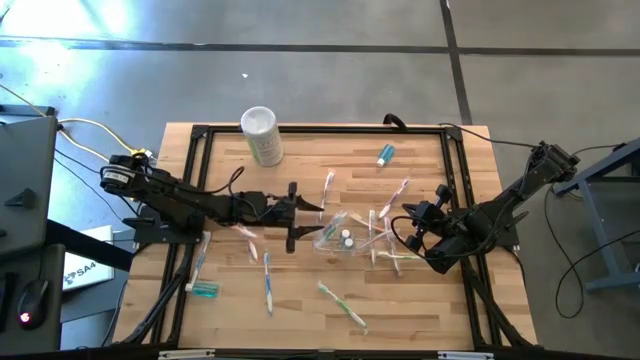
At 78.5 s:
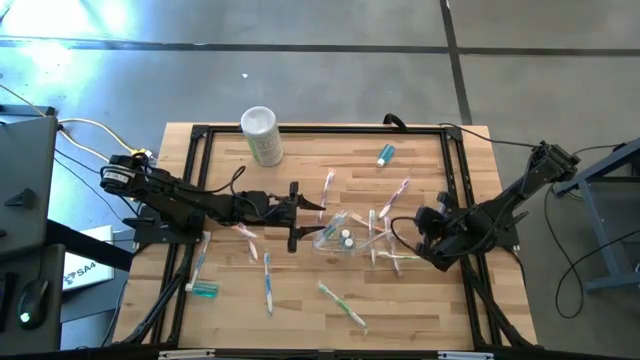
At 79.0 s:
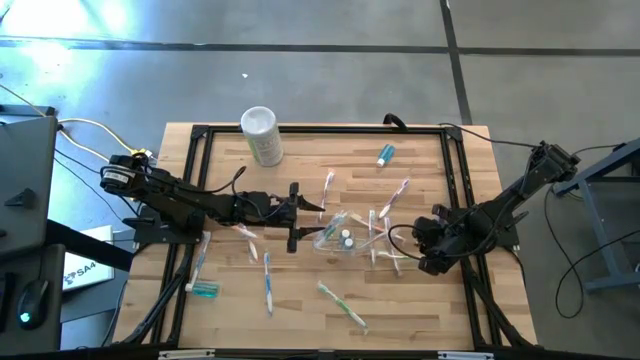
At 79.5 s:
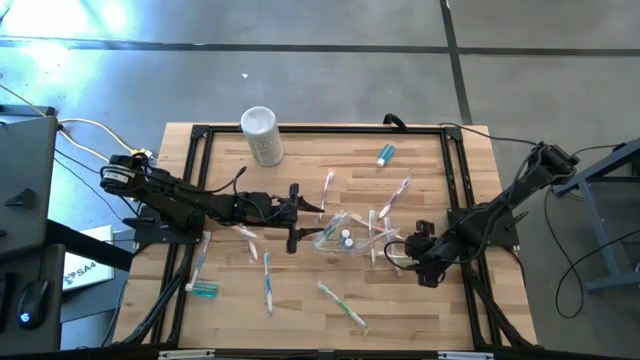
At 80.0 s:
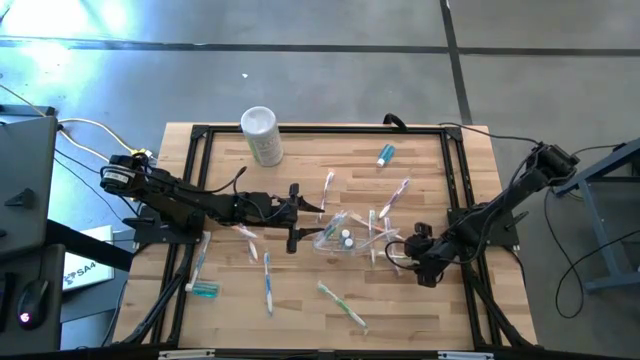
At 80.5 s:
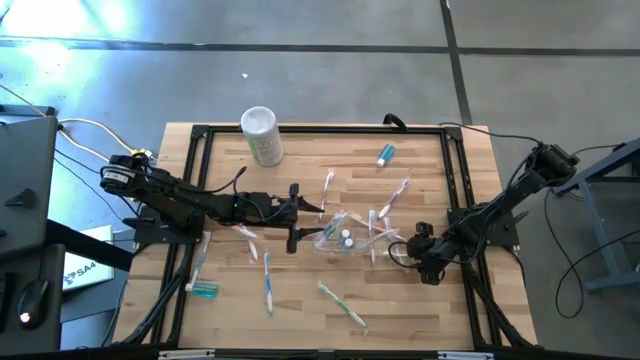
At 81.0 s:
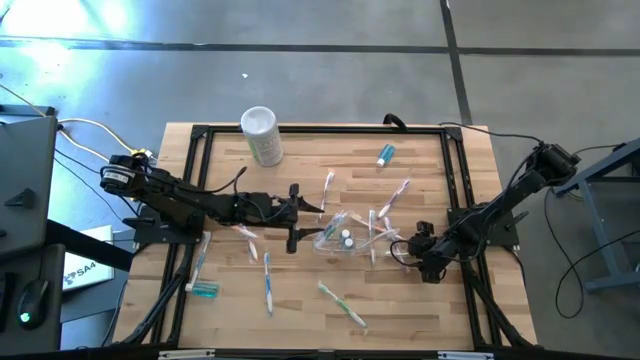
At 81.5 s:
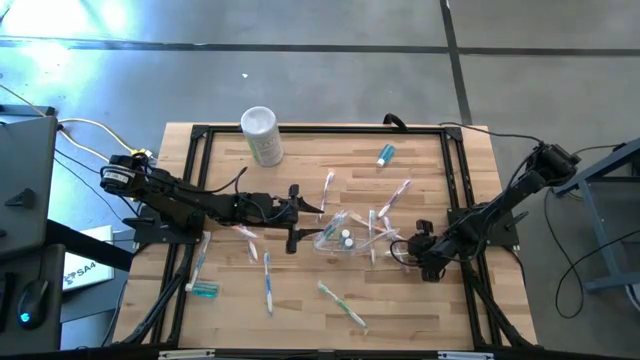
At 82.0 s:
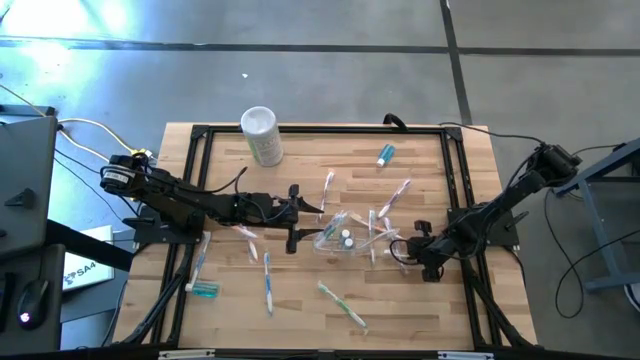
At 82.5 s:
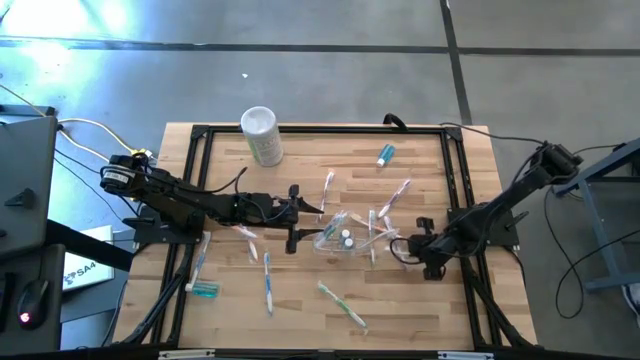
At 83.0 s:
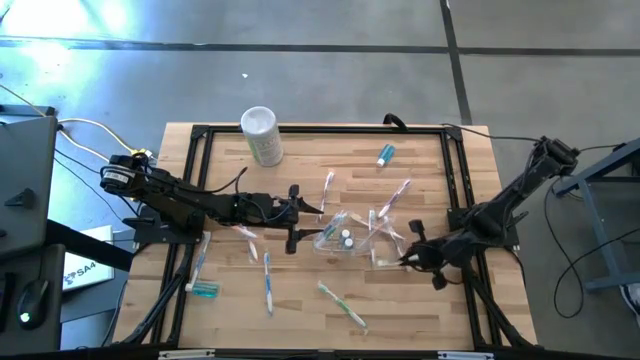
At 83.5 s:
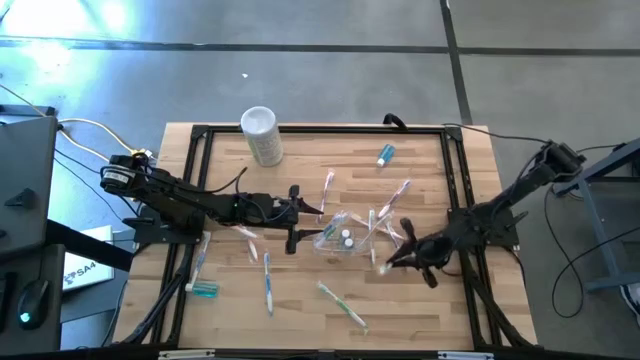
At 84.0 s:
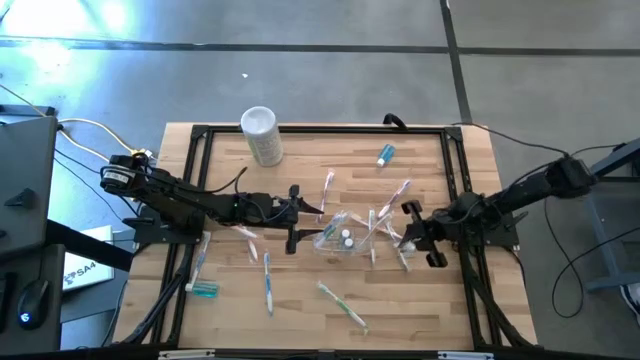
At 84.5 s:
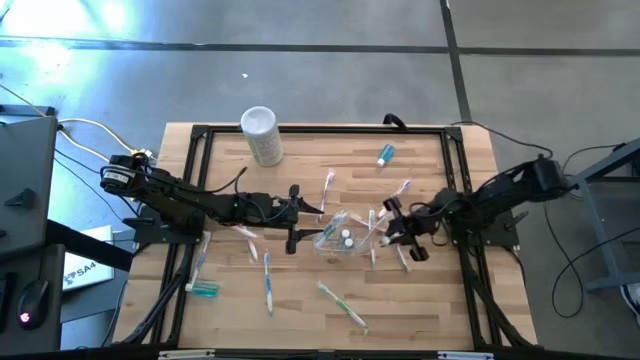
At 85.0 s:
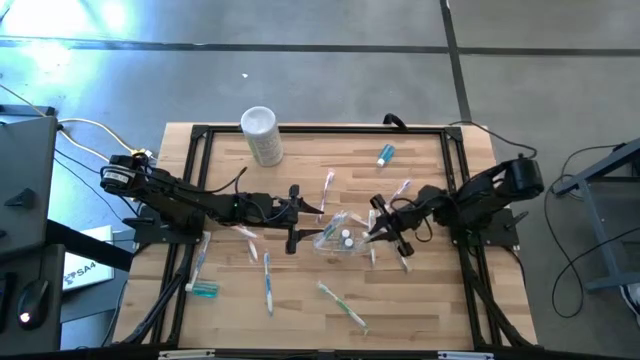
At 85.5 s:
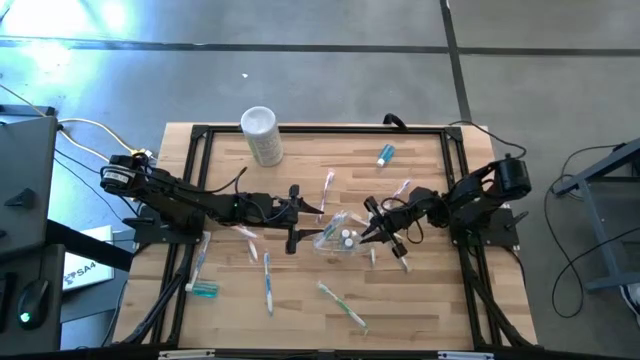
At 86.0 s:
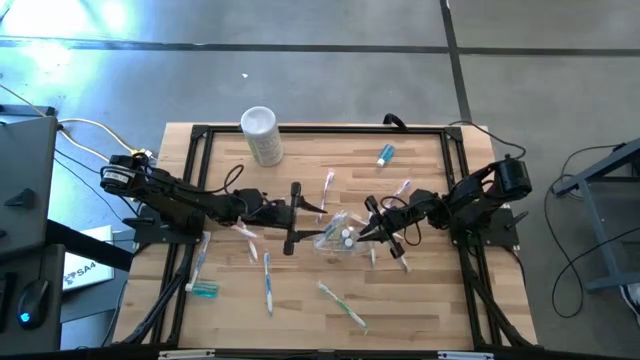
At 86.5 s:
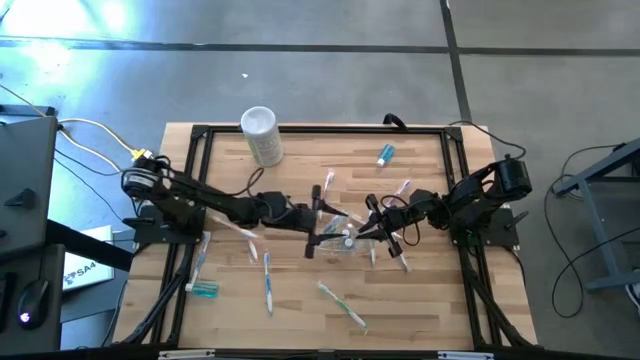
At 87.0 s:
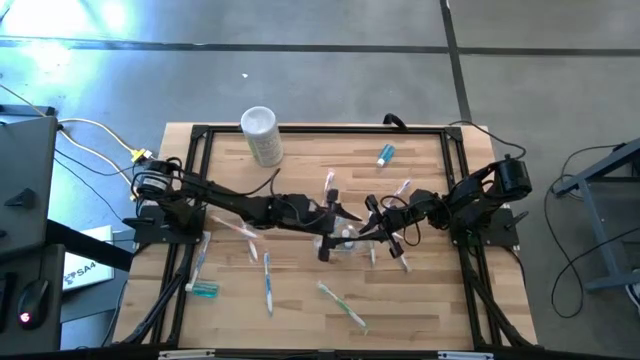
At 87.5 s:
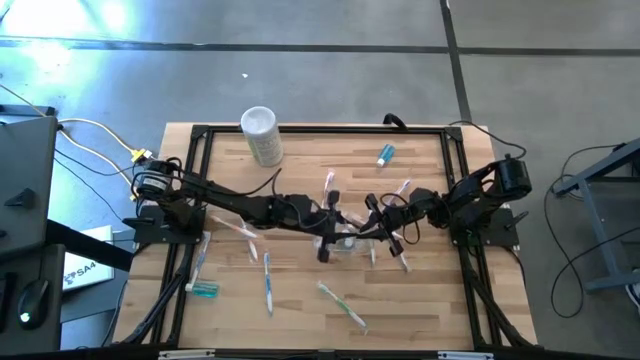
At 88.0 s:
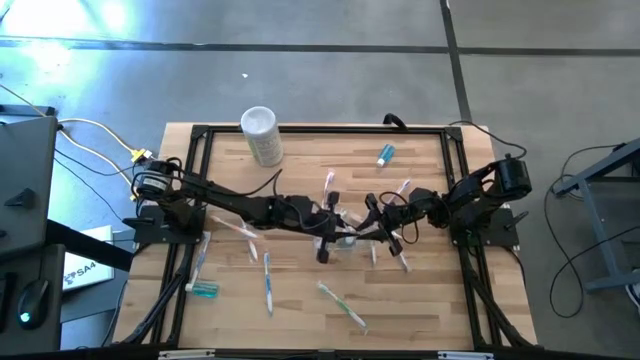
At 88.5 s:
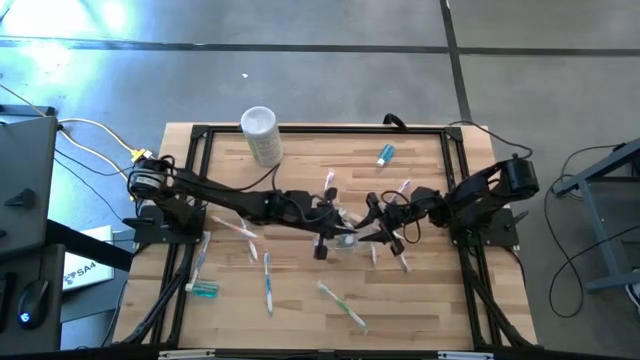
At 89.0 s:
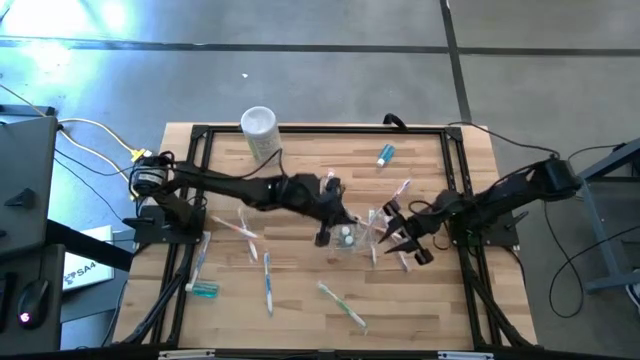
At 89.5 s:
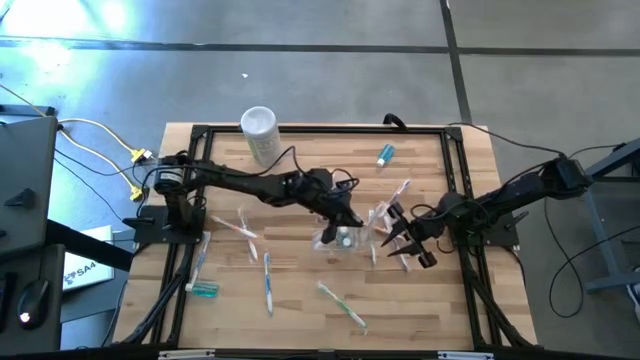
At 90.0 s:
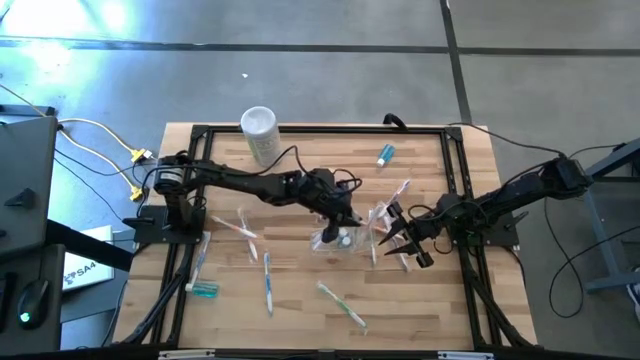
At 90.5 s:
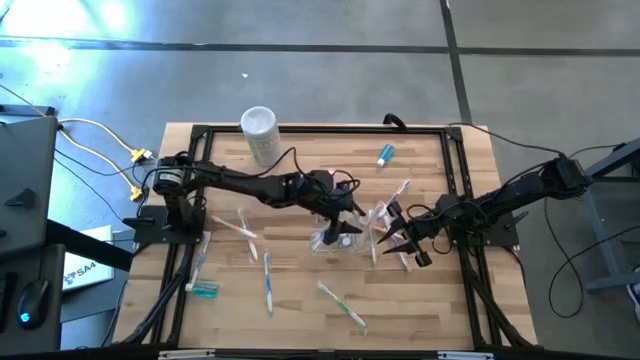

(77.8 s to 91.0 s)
Task: Pick & Place toothbrushing station
Put the green toothbrush into the right section of the transparent organizer

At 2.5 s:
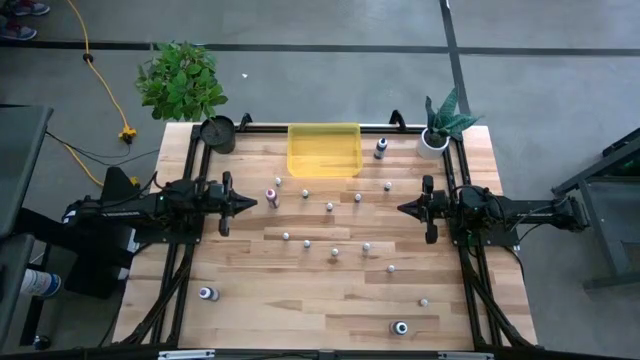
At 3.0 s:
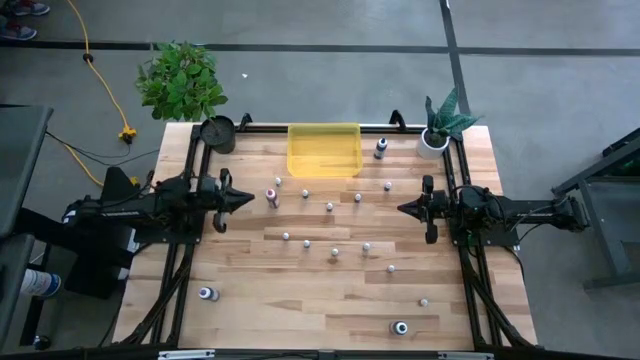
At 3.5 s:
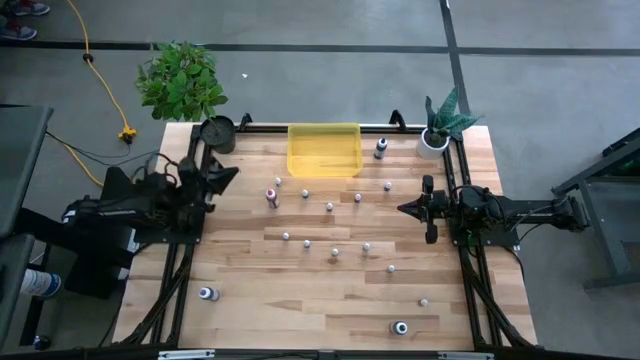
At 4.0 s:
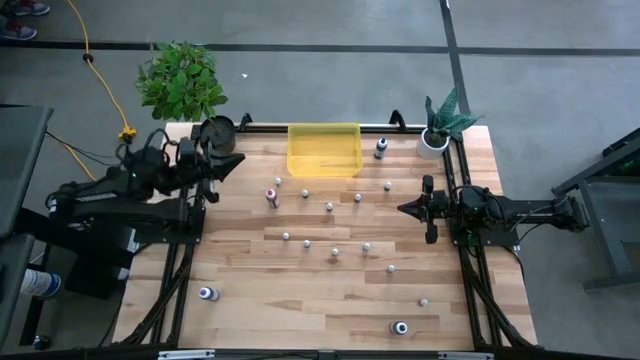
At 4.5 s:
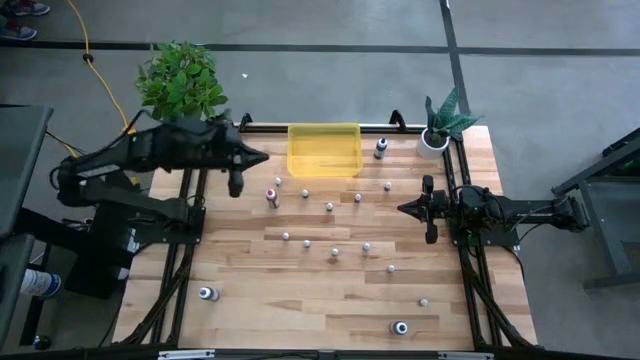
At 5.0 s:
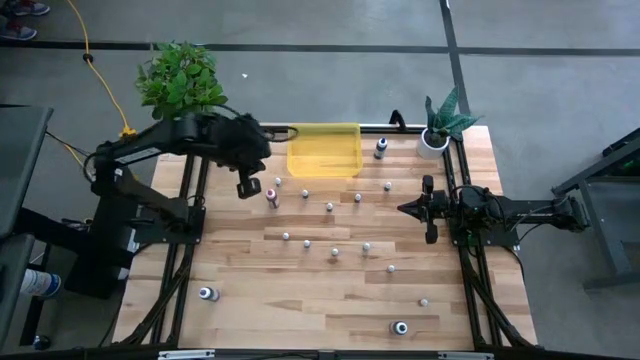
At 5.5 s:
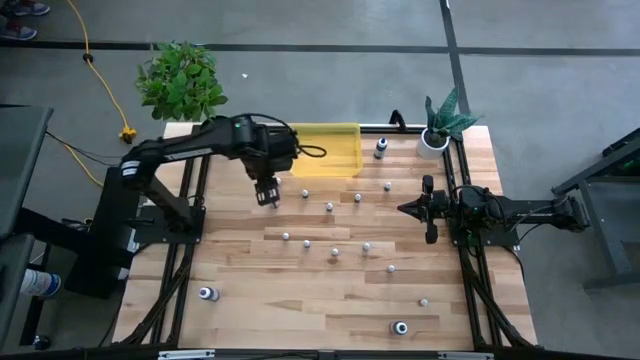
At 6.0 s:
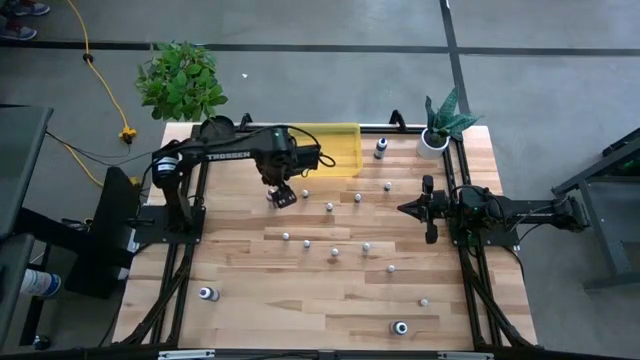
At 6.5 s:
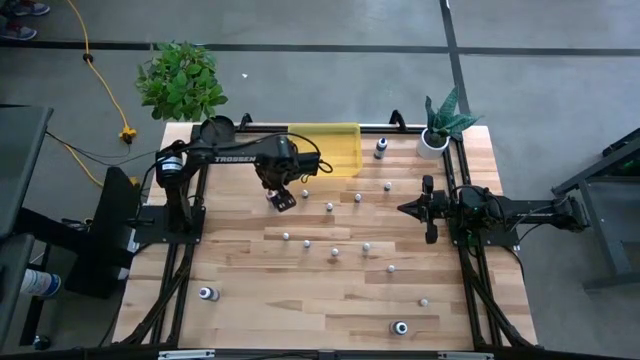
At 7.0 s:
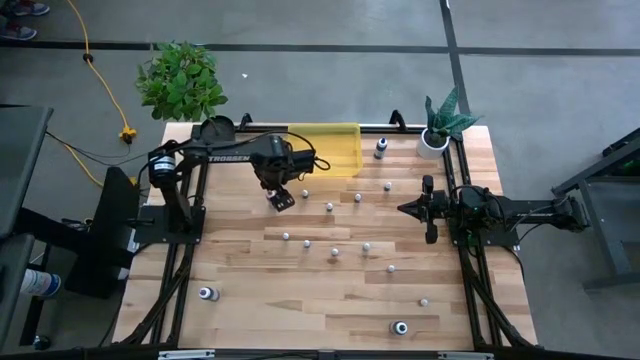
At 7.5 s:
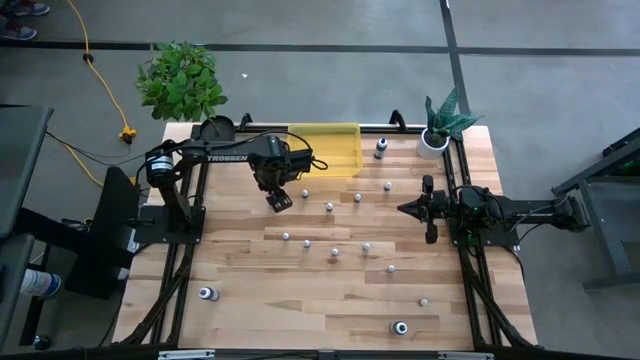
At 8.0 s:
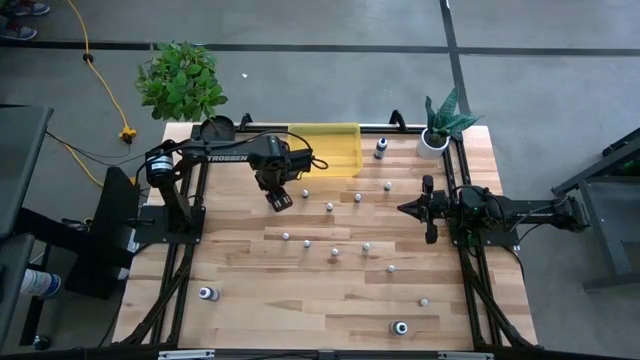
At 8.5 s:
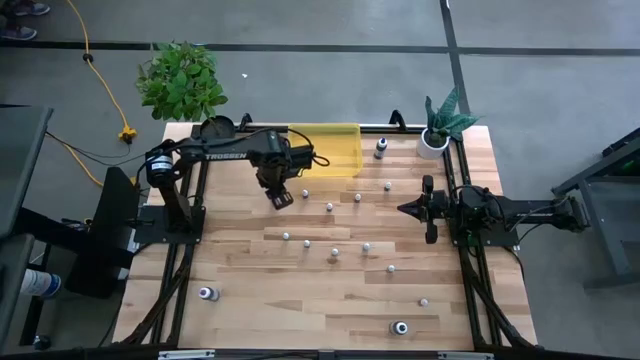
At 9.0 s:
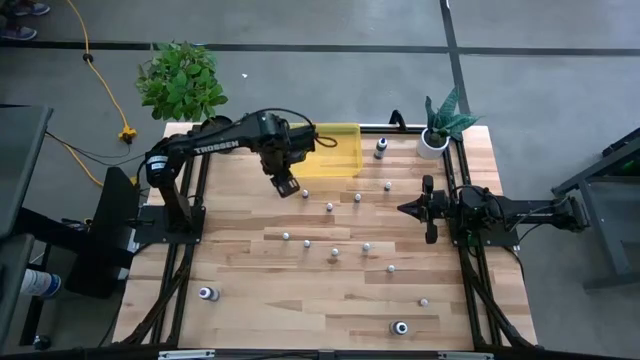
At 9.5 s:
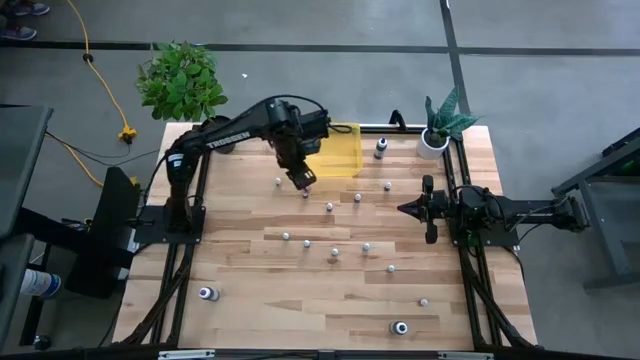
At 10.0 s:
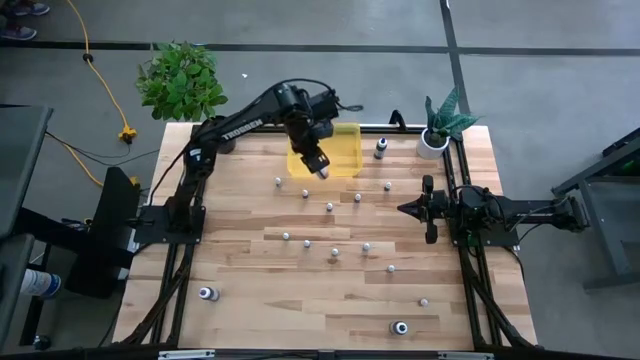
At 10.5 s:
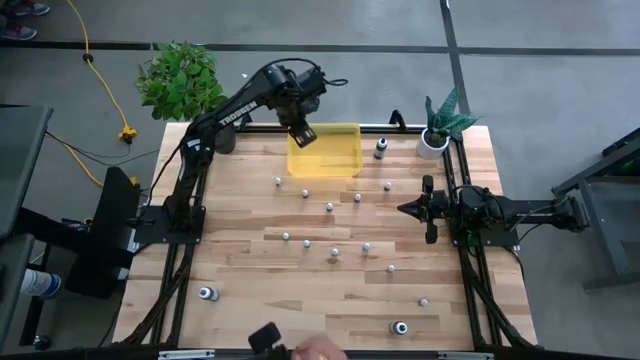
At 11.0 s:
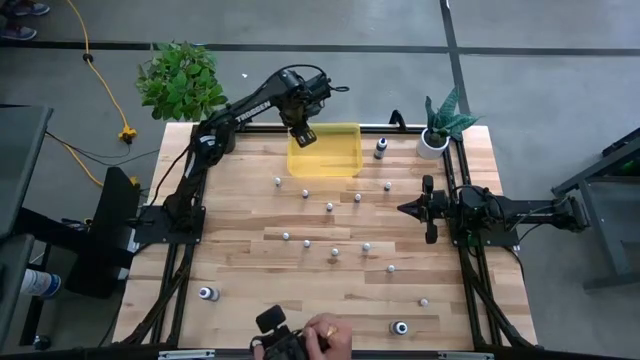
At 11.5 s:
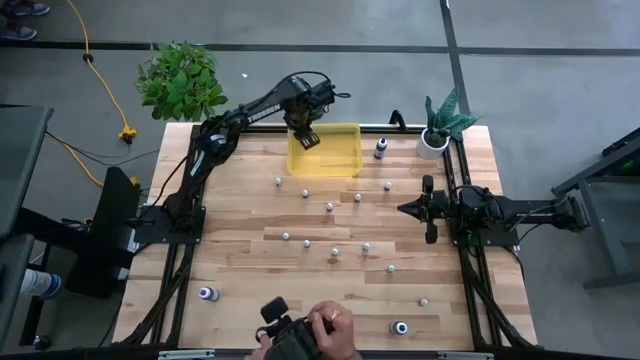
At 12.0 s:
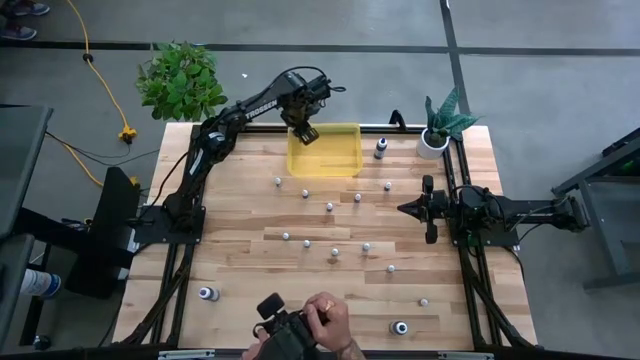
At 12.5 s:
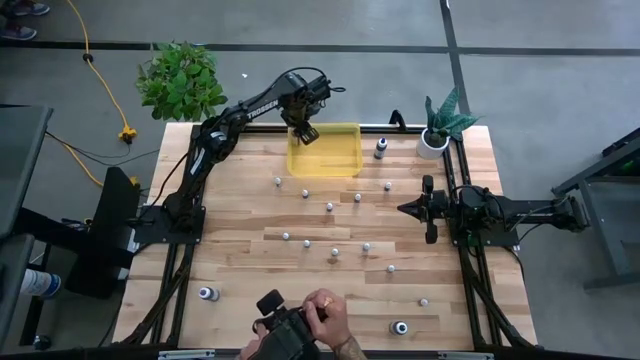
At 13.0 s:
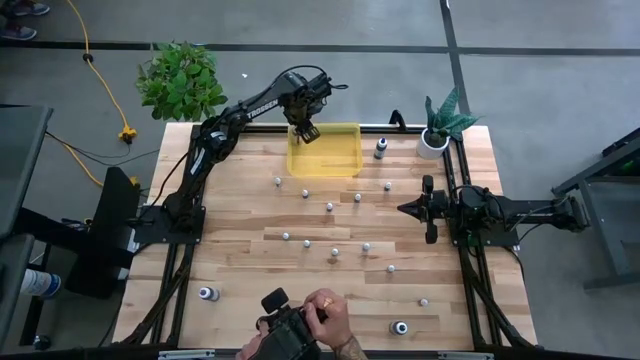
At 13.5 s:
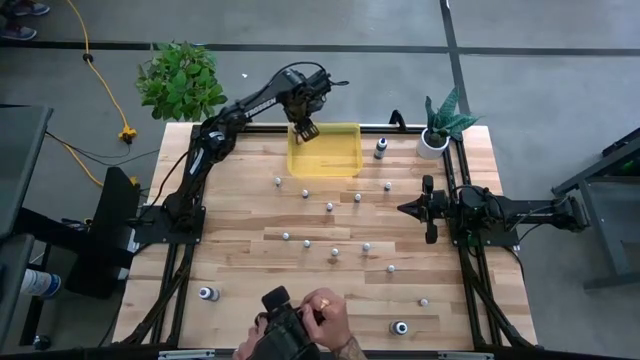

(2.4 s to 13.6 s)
Task: Pick & Place food coloring
Put the big pink food coloring bottle into the yellow container
